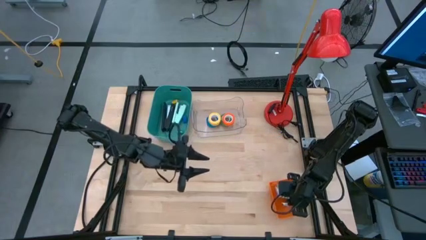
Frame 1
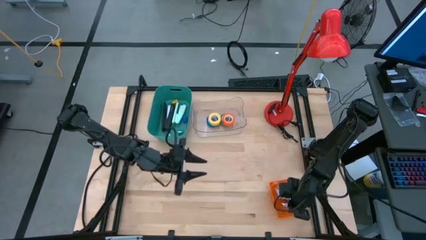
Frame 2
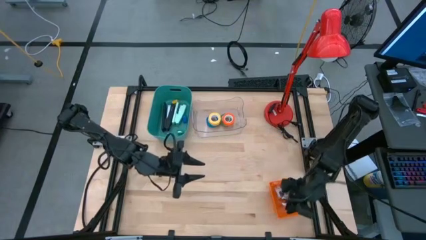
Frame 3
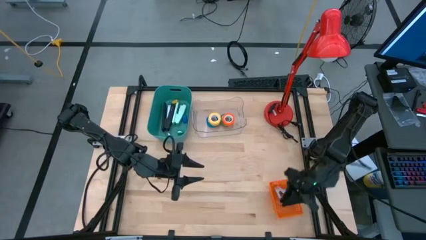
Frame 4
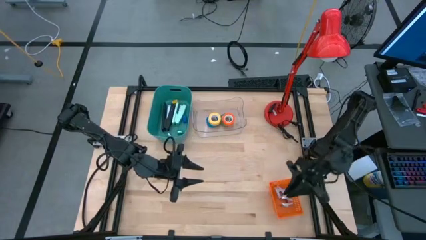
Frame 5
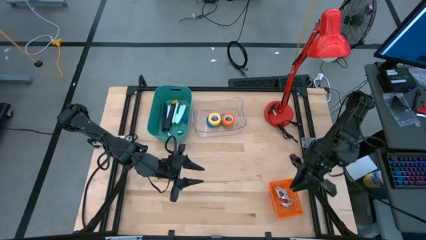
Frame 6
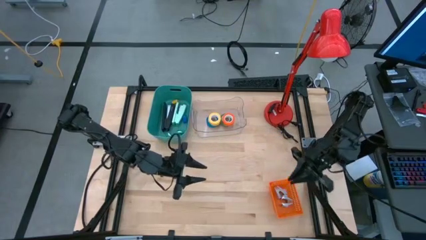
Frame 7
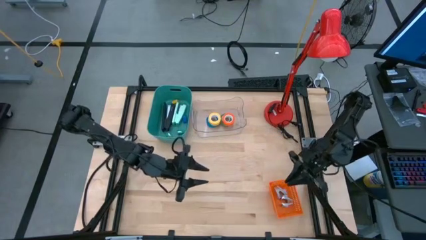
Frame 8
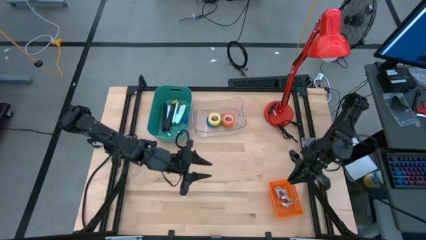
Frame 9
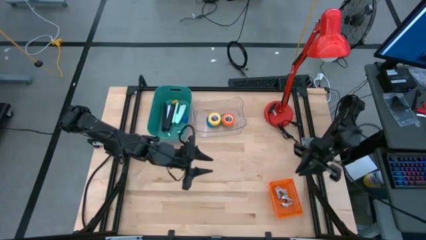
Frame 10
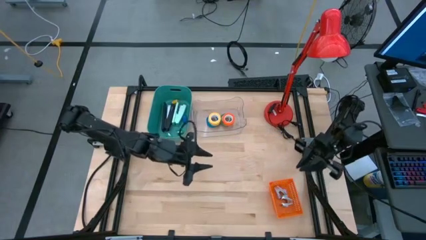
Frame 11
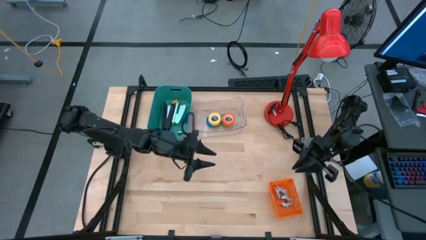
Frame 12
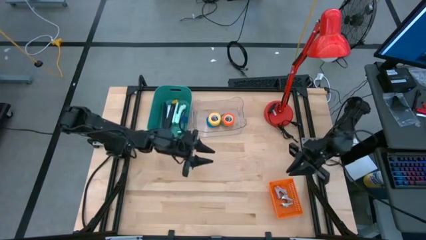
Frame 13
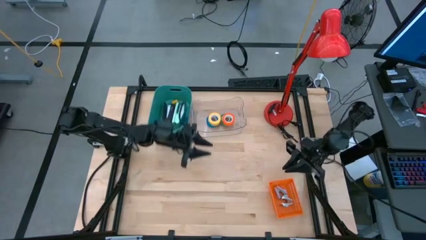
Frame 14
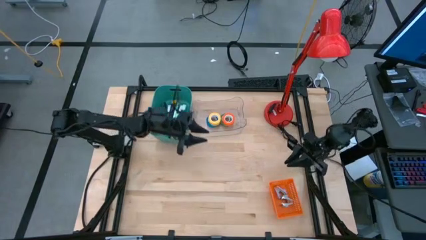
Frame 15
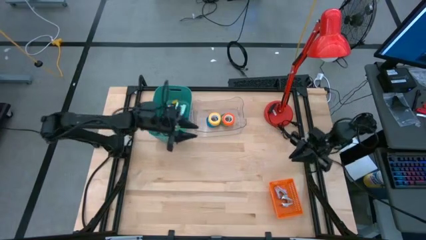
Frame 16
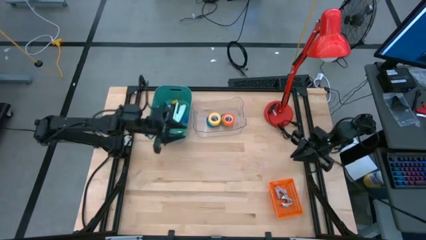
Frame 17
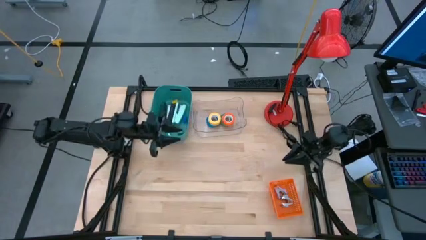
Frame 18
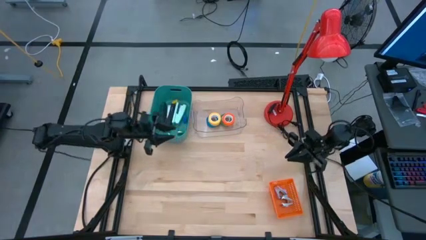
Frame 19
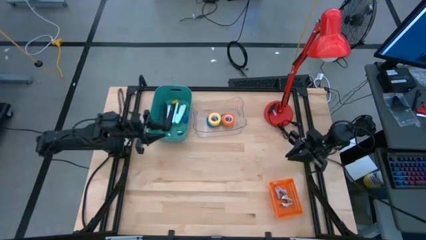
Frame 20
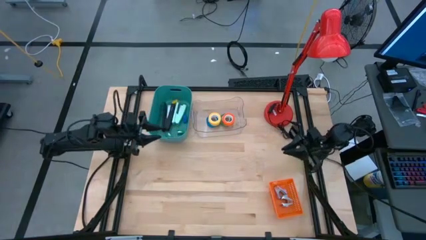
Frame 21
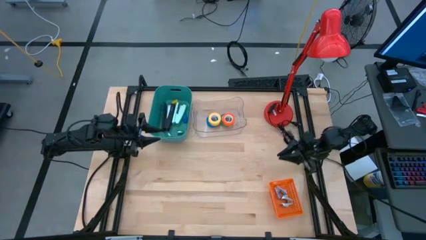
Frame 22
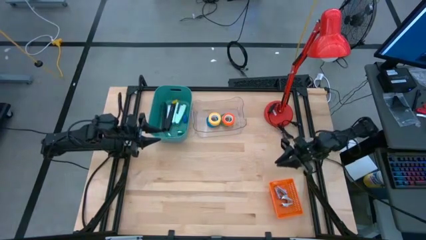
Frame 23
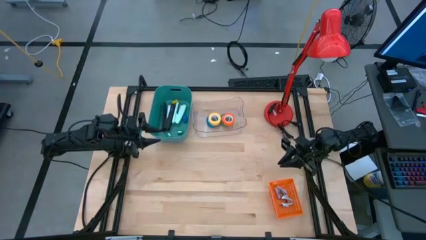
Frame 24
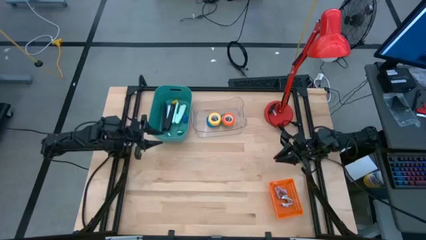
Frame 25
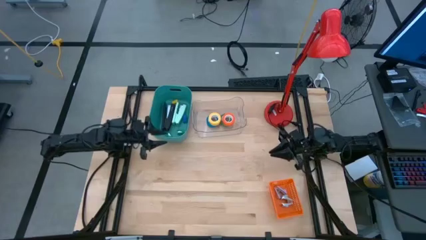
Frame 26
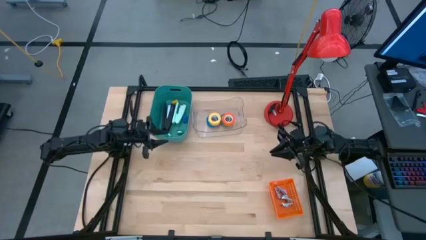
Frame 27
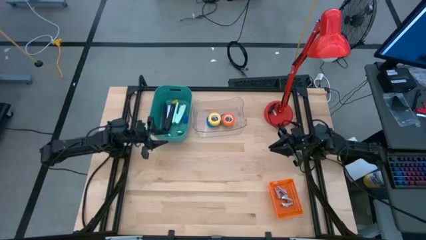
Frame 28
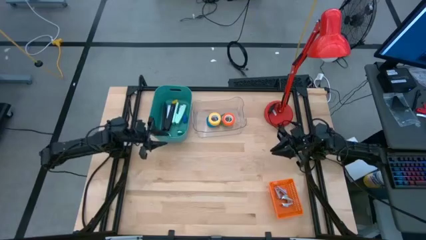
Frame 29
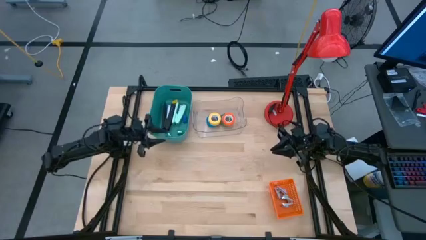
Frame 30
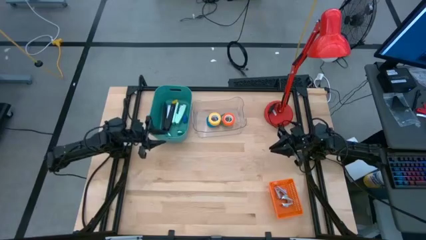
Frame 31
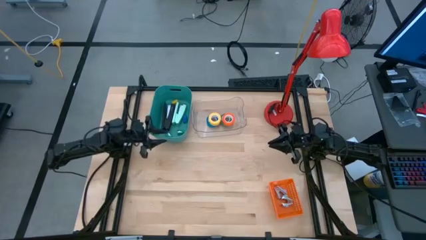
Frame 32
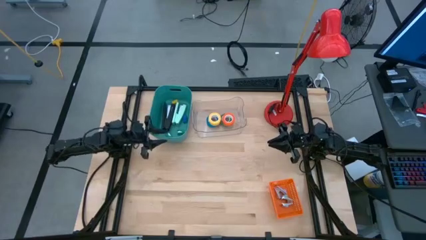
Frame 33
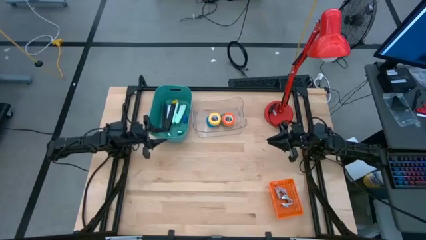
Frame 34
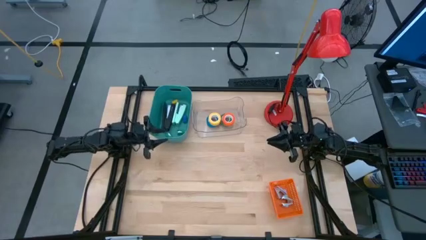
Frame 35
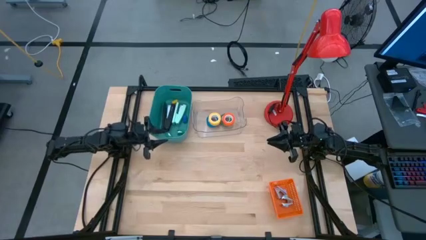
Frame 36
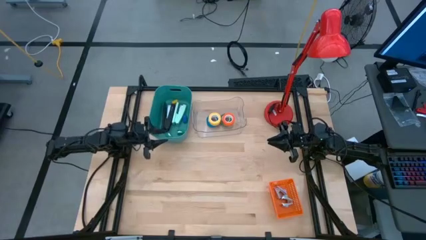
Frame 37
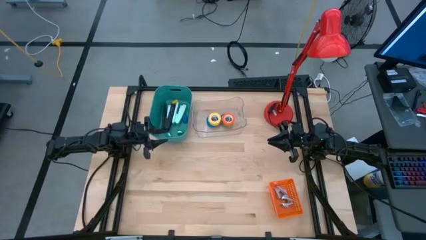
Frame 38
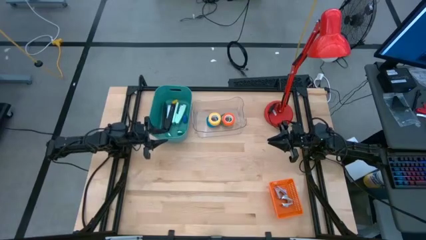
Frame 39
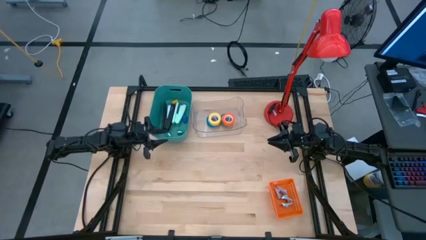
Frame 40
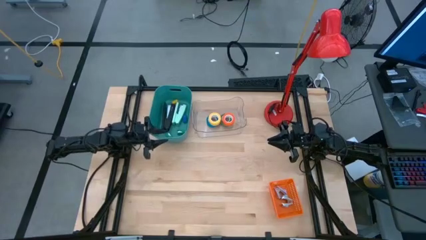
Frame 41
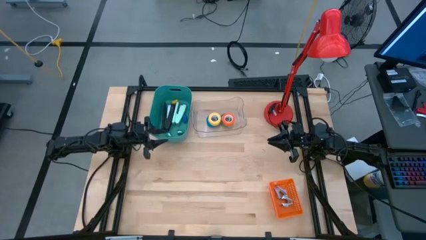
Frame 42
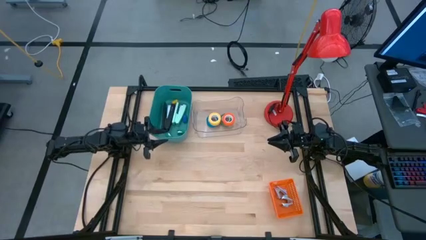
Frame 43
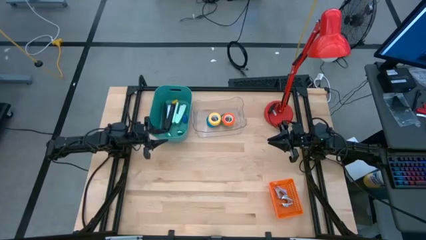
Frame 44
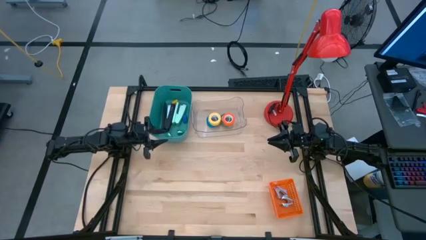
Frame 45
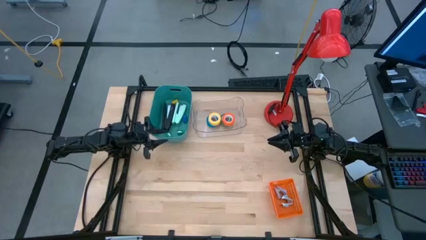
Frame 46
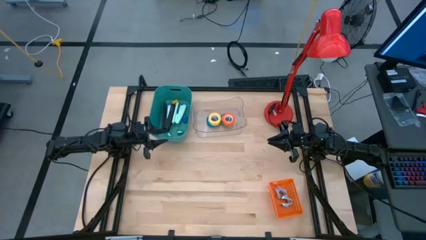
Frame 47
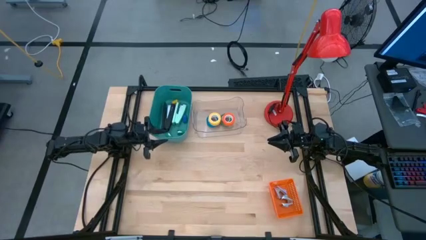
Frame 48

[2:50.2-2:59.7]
Task: Pick and place Stapler, Stapler remover, tape
Return to Home Position
